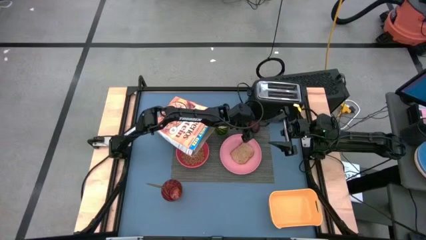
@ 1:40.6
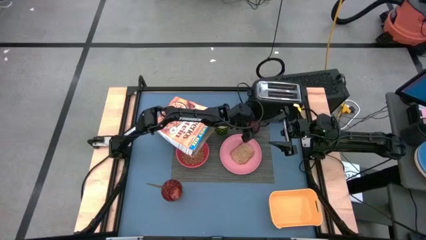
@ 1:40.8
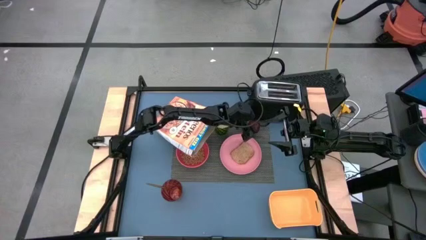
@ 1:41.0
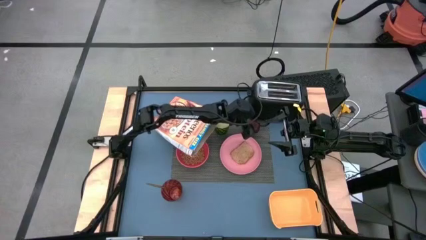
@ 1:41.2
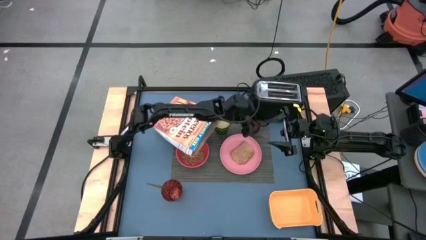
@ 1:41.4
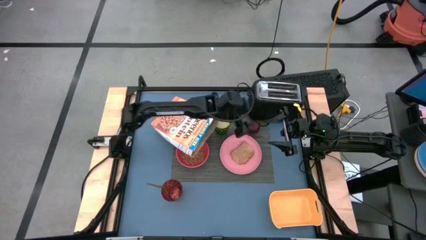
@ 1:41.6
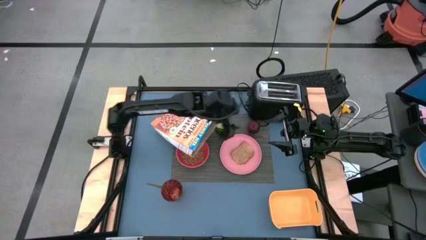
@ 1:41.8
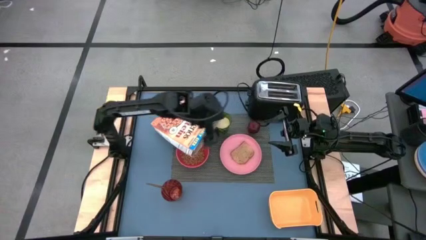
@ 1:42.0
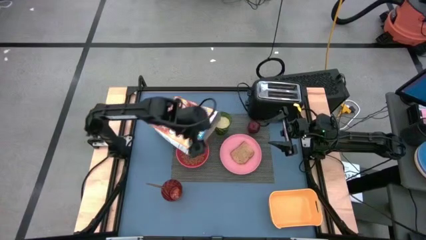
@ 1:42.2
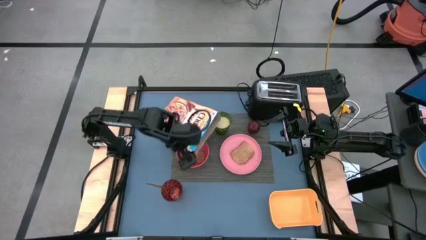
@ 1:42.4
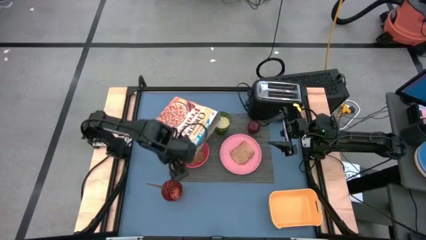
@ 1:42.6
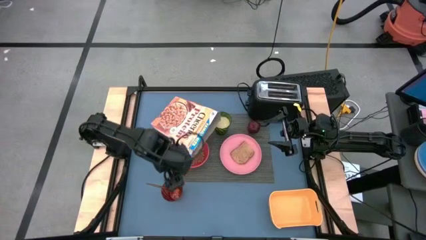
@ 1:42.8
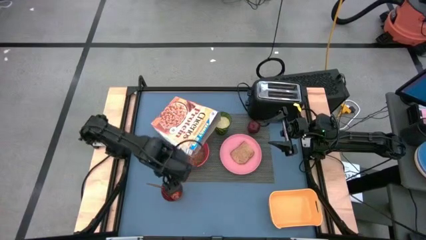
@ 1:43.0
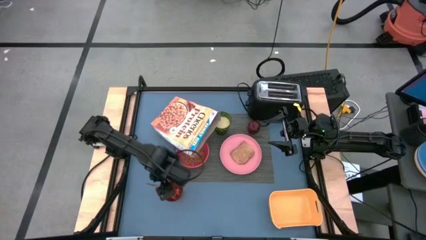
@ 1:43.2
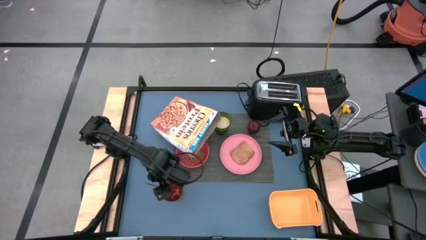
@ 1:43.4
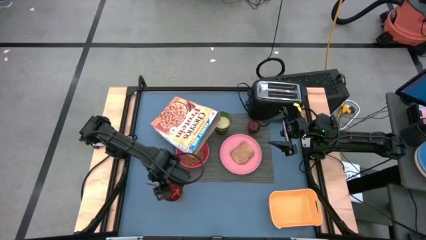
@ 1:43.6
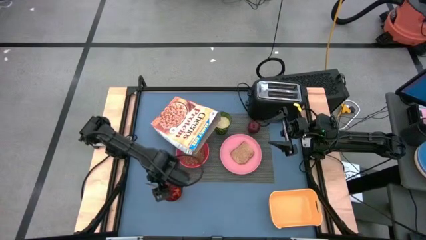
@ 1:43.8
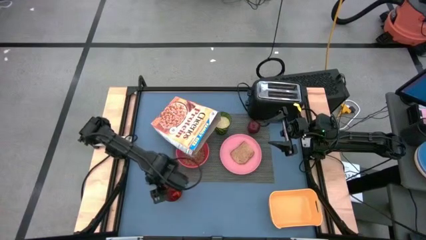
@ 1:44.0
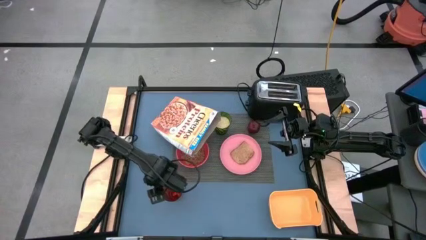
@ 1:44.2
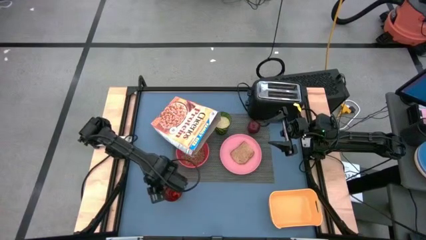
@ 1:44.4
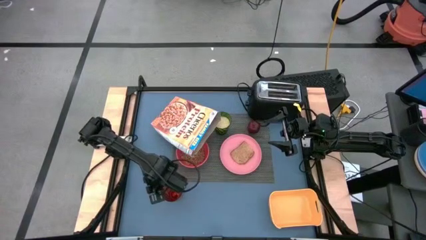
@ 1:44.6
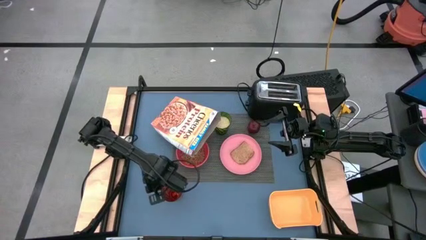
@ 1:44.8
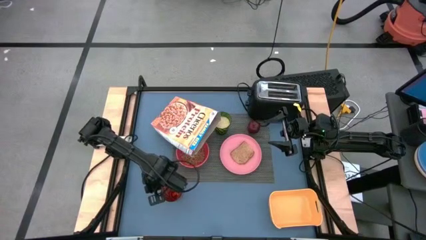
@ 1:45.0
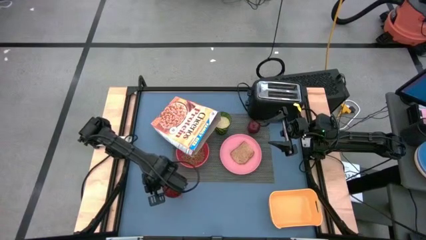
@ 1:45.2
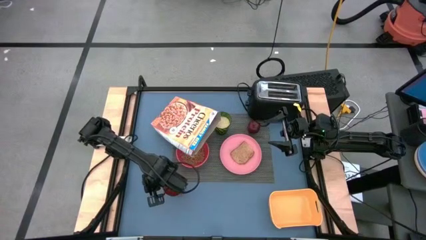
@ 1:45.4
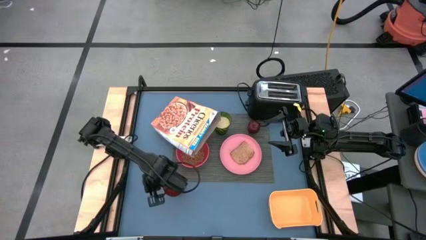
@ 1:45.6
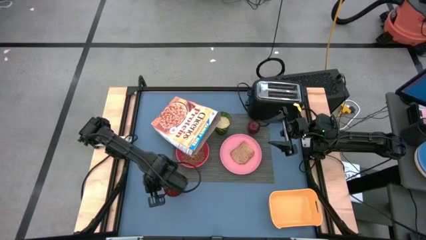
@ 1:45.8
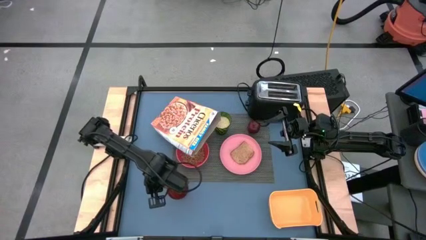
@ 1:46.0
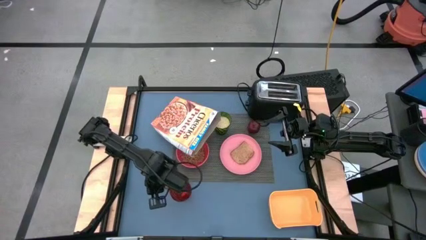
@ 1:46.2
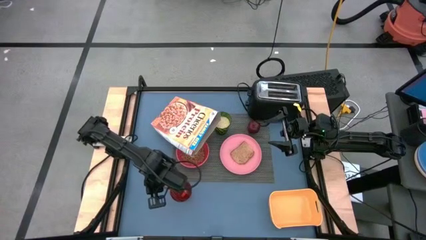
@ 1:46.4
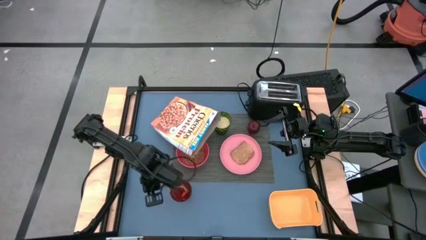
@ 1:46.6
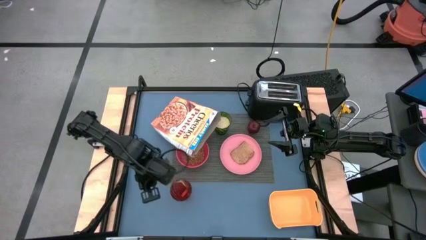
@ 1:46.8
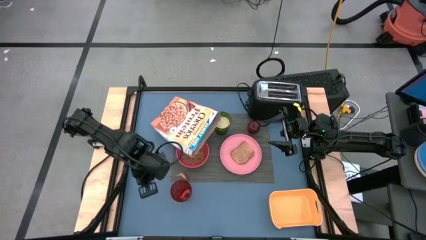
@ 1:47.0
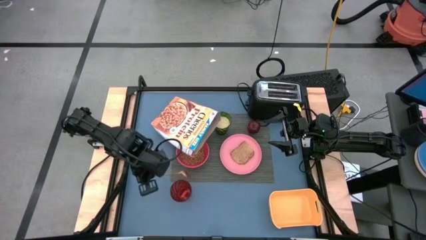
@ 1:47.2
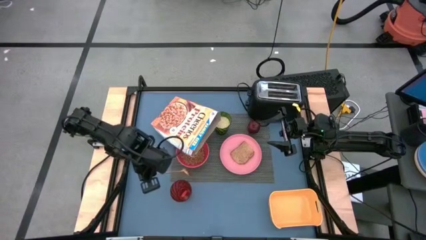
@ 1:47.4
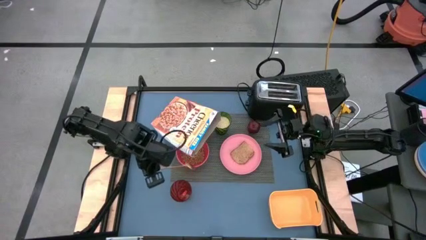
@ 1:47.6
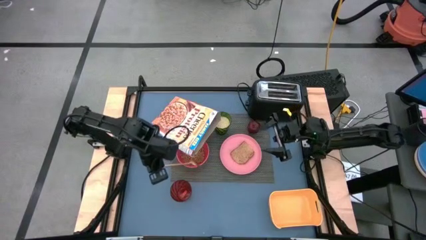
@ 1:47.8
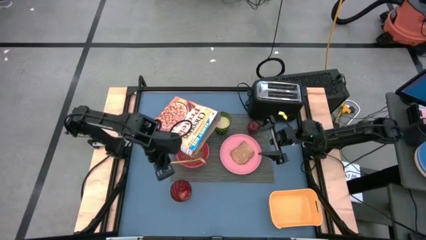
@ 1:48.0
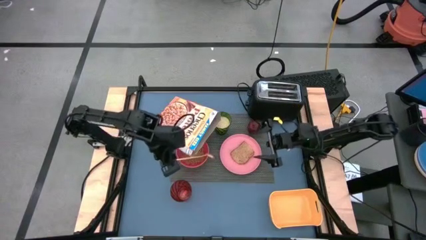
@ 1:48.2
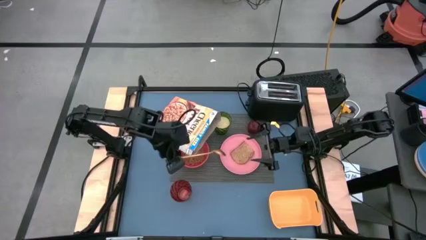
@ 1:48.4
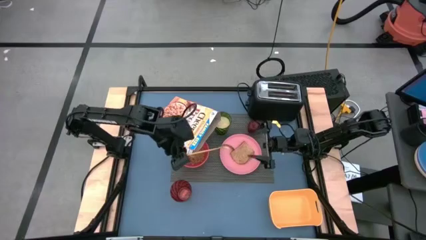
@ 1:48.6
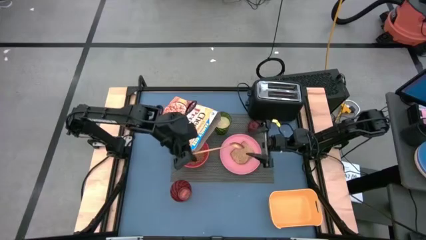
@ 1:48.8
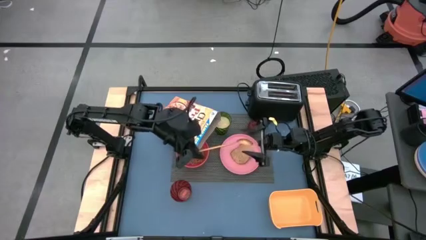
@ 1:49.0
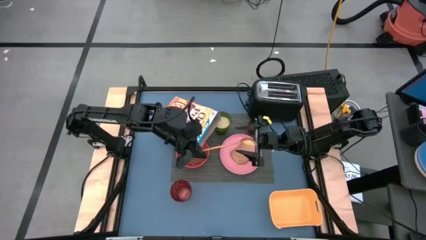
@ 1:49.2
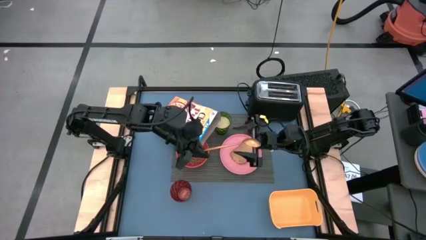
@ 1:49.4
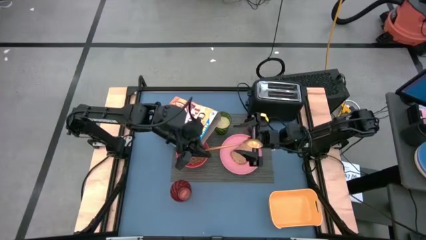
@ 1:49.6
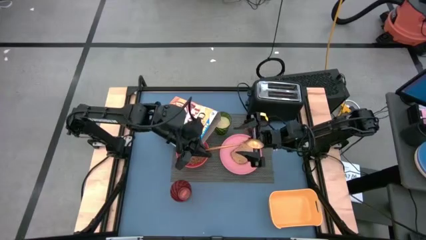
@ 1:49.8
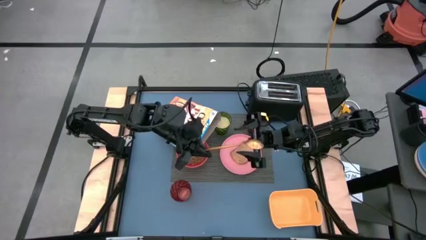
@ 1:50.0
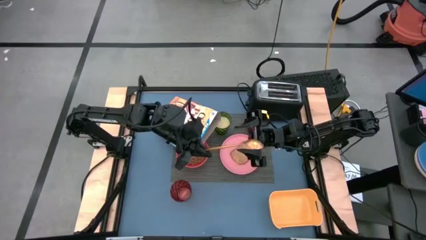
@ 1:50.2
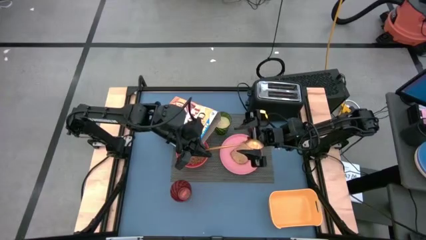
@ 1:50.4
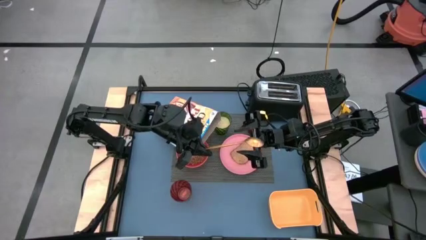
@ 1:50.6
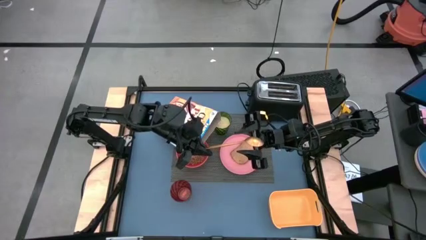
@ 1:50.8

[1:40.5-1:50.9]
Task: Arrange a breakfast setting
Put the spoon on the left side of the placemat

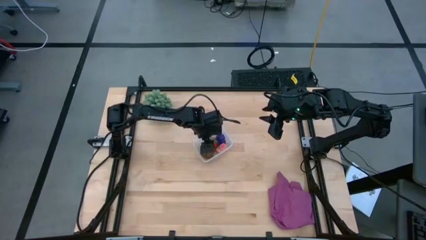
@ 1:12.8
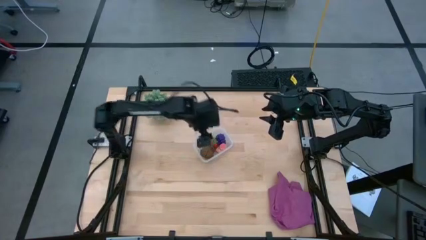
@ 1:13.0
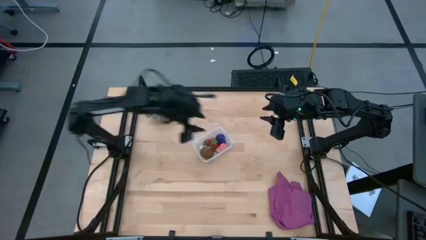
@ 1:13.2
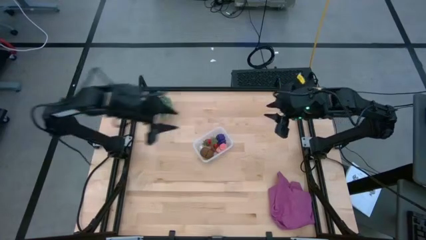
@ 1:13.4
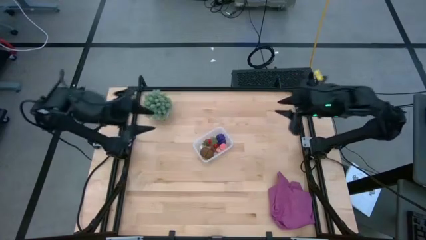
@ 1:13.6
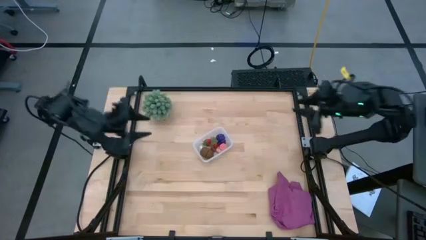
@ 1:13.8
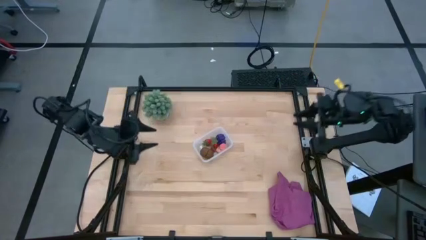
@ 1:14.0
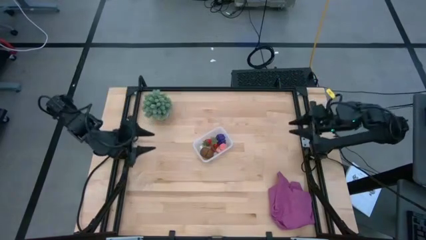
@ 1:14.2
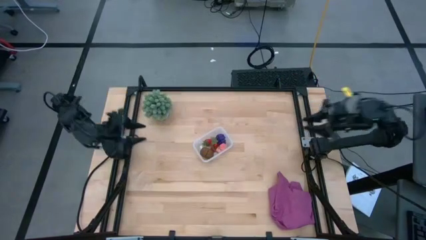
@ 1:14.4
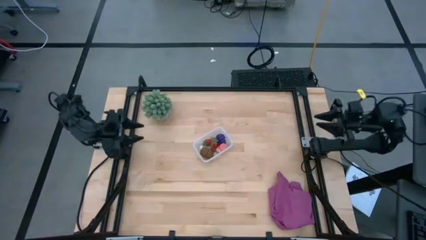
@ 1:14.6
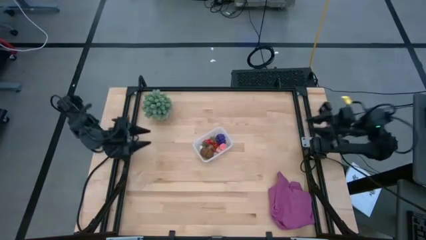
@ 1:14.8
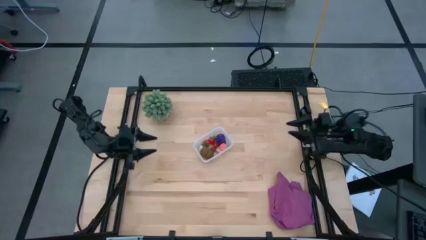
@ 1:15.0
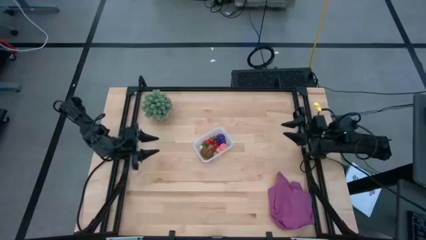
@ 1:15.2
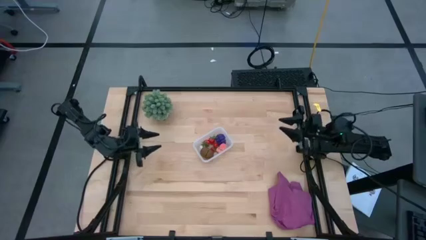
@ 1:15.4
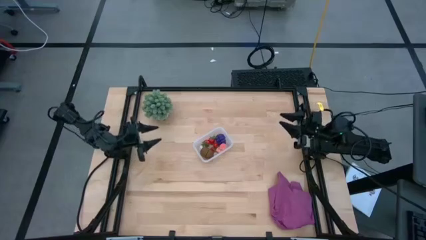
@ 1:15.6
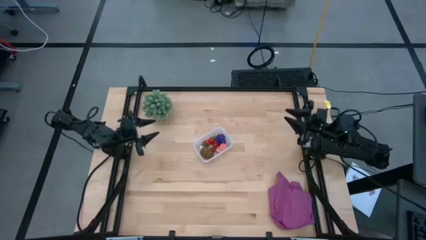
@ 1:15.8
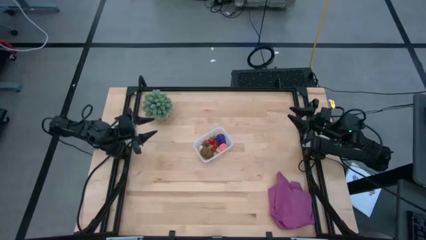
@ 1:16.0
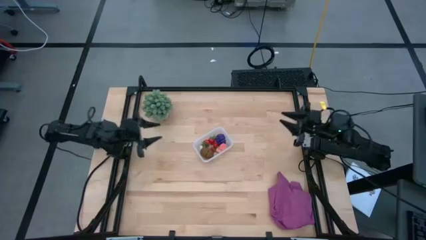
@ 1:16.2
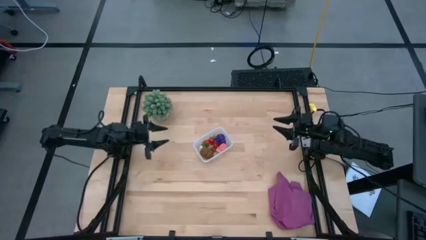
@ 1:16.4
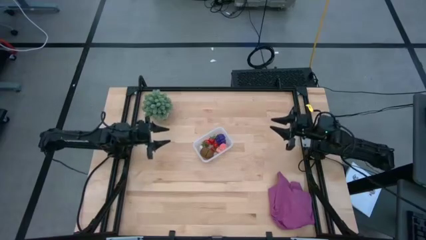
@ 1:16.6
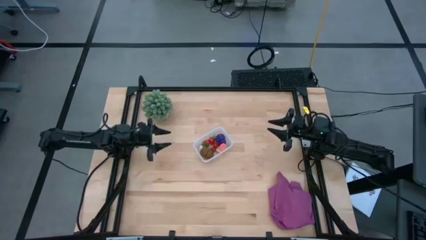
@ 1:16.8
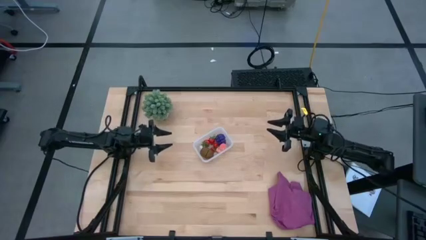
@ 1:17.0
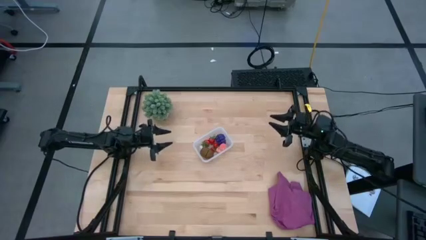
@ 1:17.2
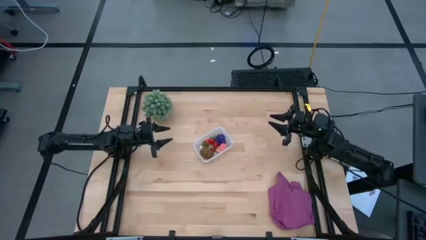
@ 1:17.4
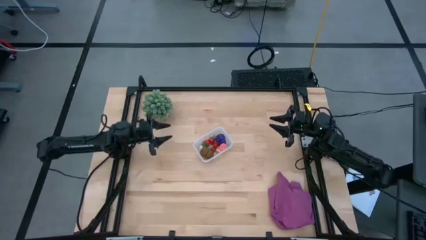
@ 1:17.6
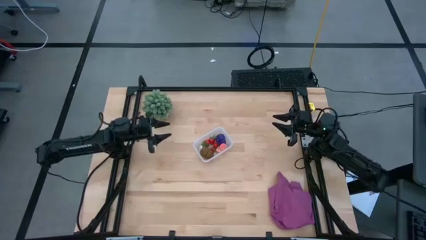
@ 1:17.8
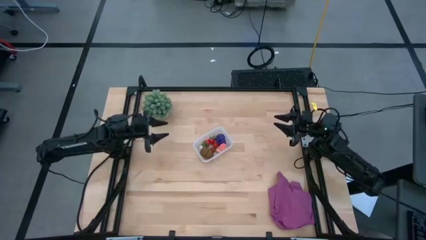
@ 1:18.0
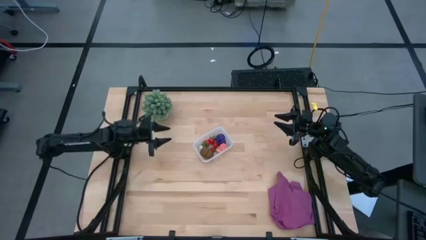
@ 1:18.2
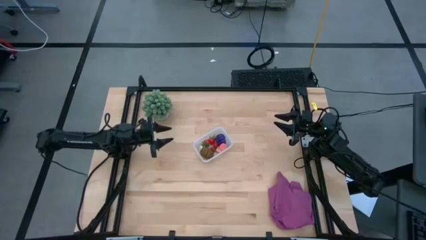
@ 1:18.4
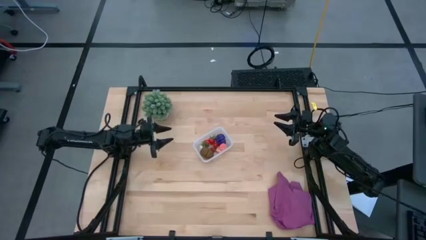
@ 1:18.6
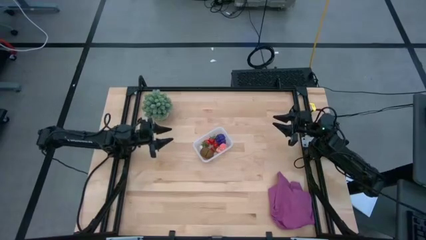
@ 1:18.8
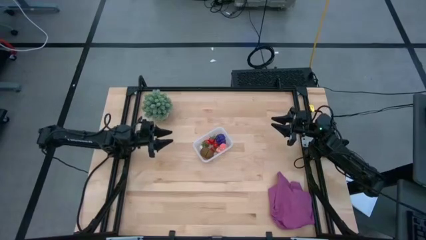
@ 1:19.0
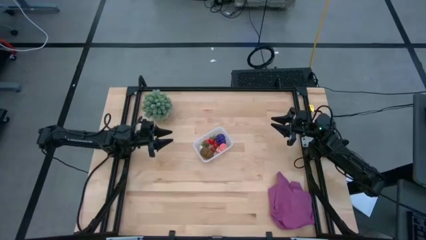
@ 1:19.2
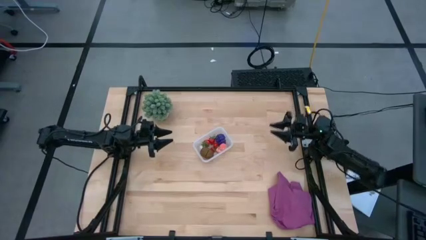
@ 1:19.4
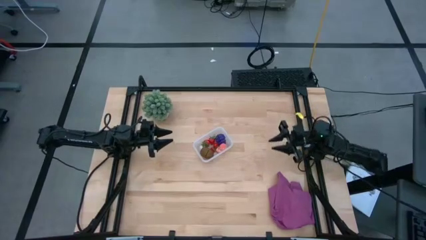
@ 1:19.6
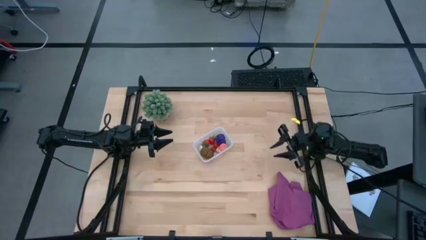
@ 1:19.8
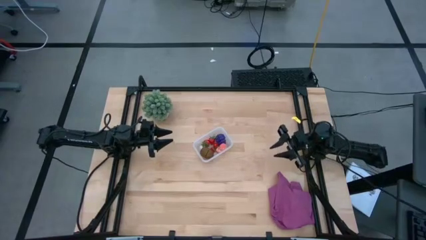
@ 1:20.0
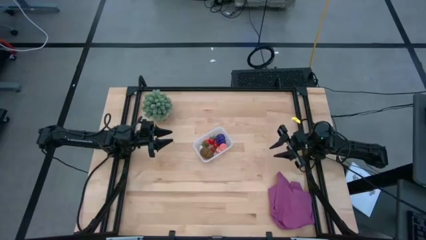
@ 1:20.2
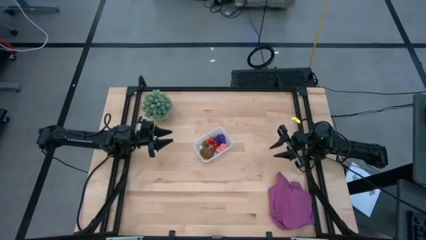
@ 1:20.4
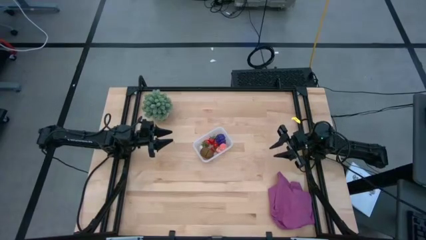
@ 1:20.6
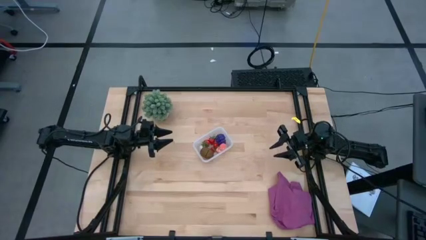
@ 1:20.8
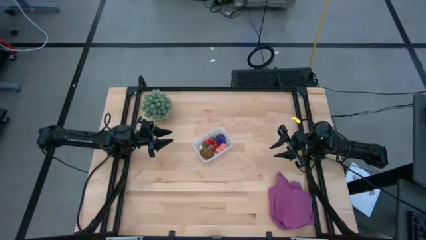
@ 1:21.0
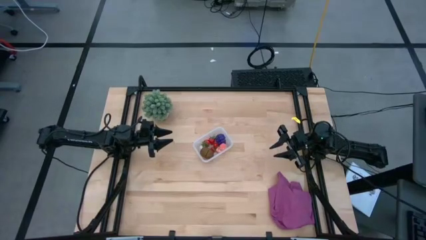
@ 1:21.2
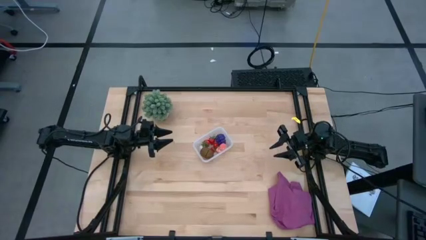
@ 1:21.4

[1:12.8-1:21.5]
Task: Pick and placing Produce into tupperware
Return to Home Position
